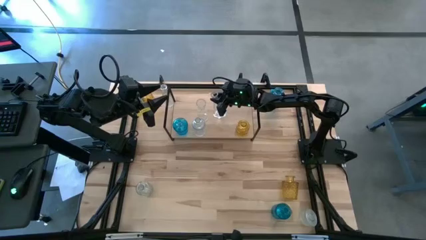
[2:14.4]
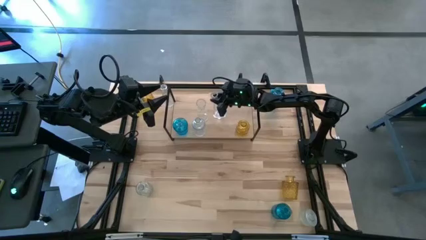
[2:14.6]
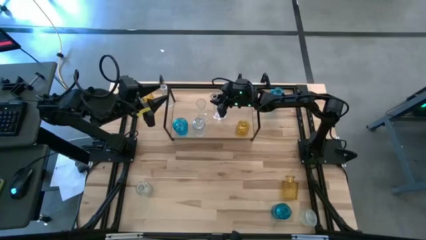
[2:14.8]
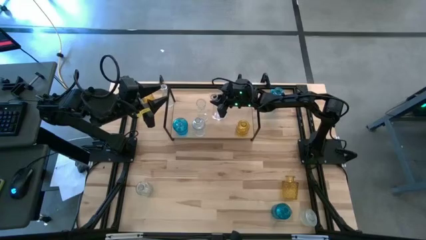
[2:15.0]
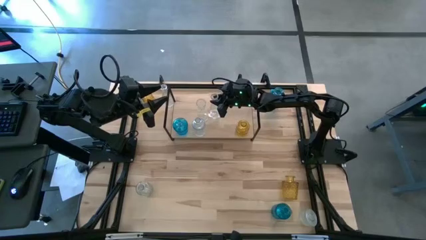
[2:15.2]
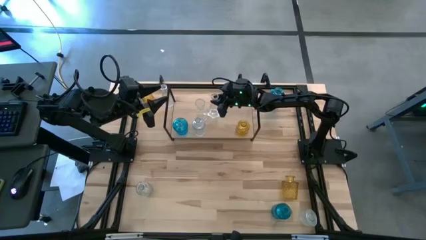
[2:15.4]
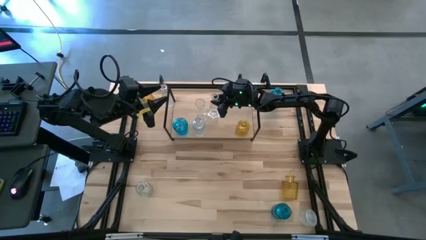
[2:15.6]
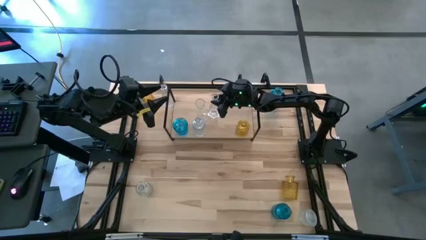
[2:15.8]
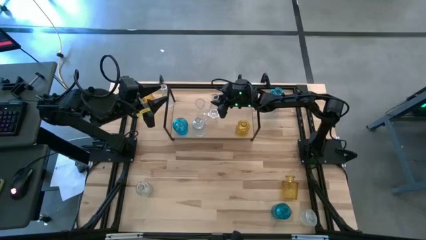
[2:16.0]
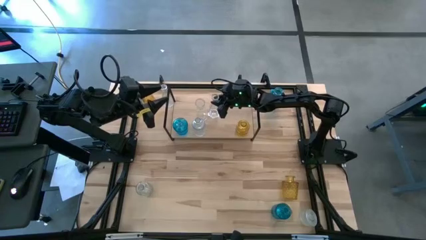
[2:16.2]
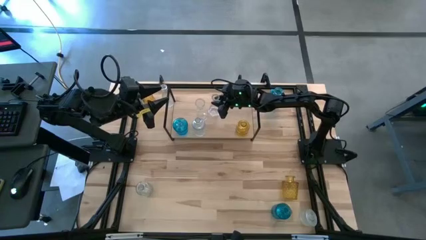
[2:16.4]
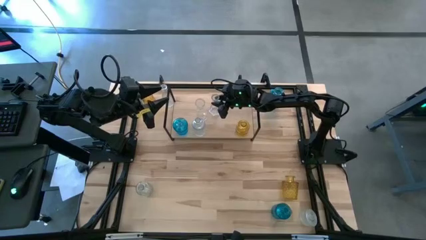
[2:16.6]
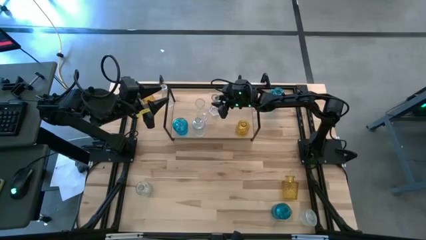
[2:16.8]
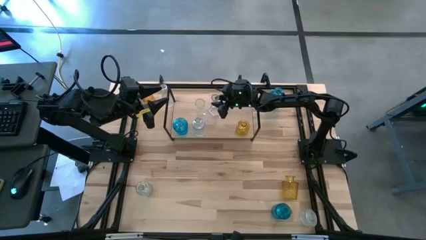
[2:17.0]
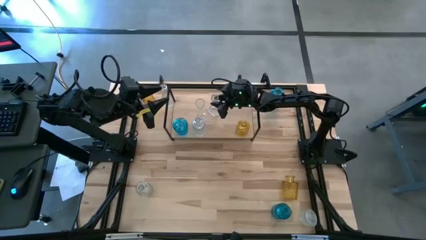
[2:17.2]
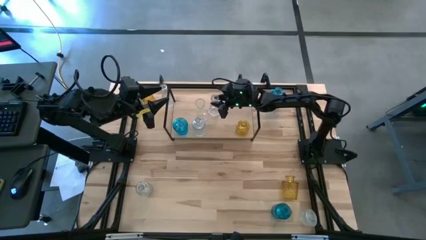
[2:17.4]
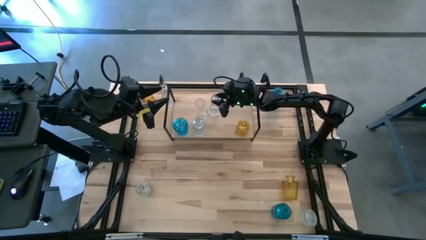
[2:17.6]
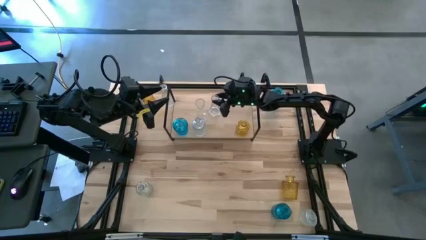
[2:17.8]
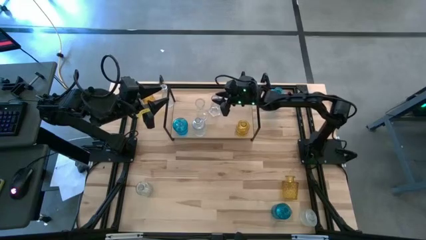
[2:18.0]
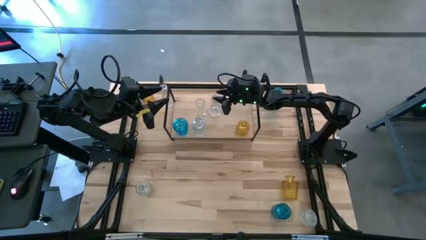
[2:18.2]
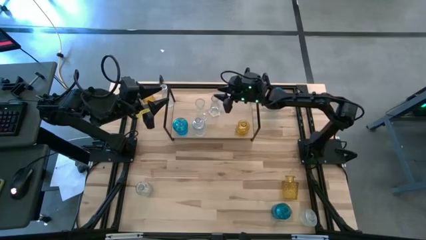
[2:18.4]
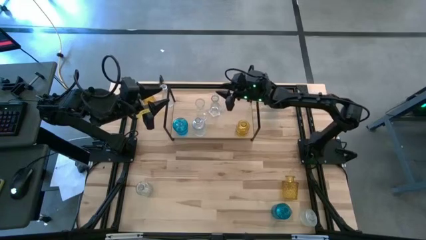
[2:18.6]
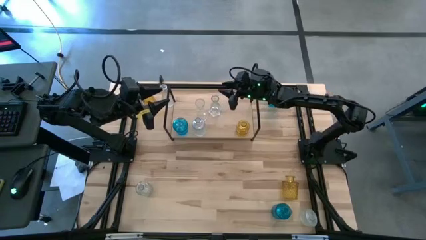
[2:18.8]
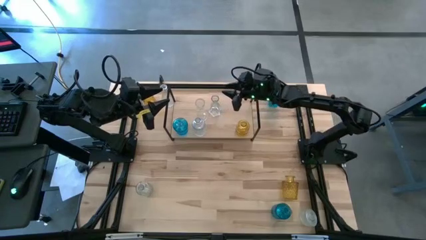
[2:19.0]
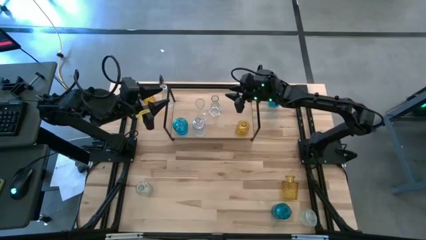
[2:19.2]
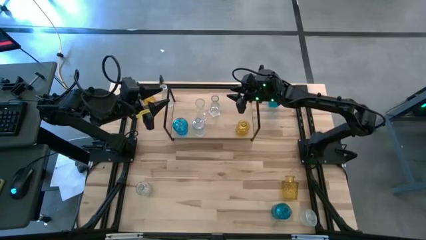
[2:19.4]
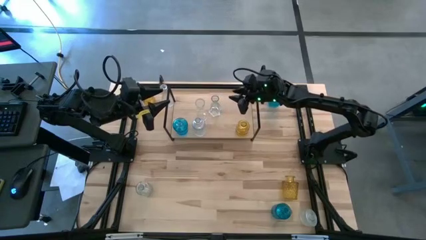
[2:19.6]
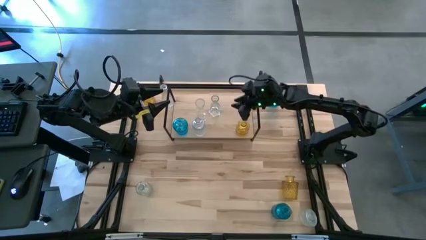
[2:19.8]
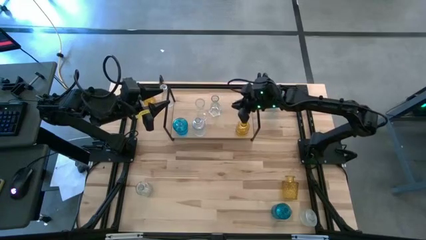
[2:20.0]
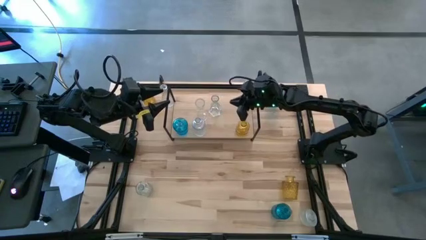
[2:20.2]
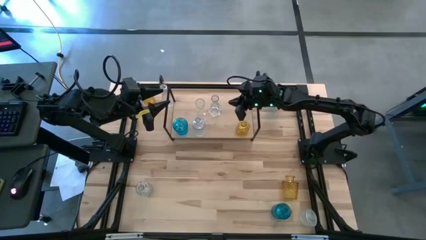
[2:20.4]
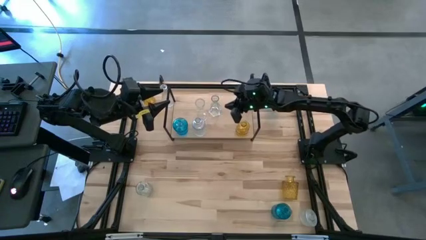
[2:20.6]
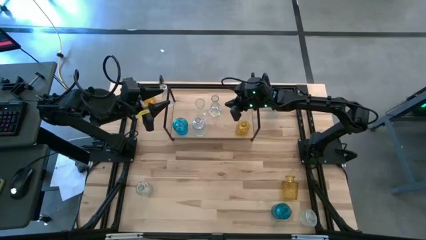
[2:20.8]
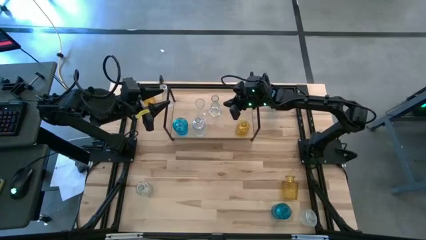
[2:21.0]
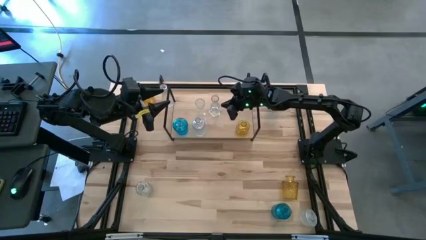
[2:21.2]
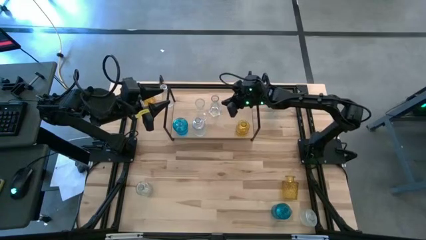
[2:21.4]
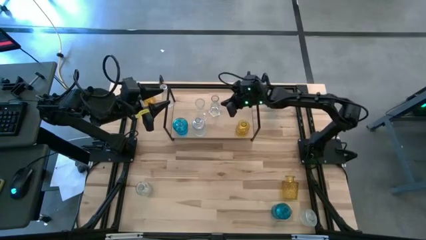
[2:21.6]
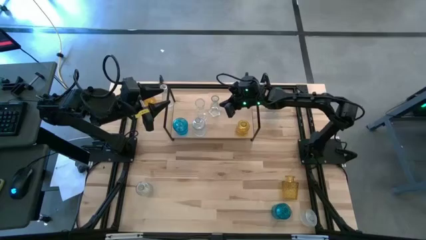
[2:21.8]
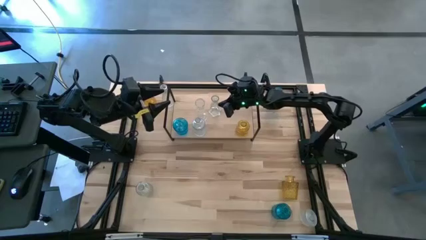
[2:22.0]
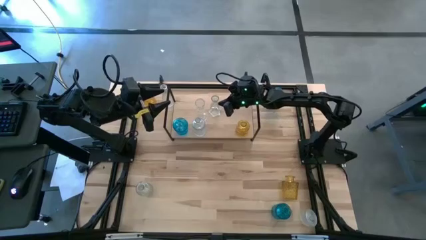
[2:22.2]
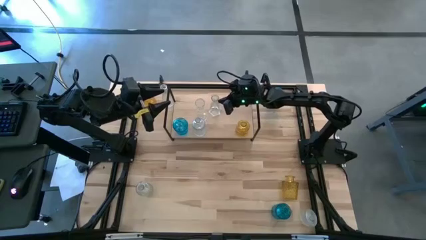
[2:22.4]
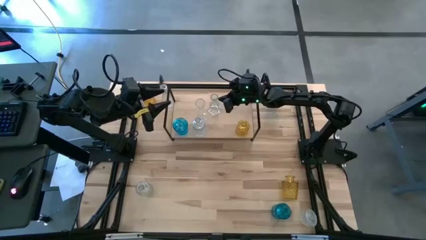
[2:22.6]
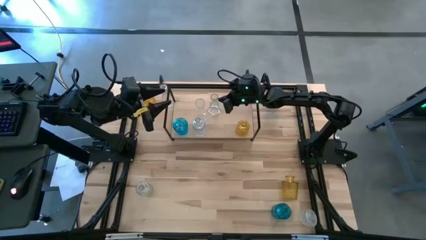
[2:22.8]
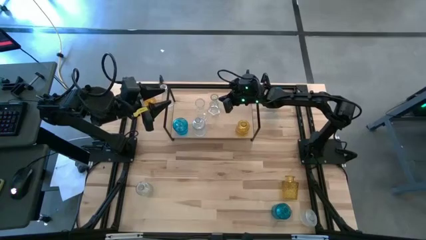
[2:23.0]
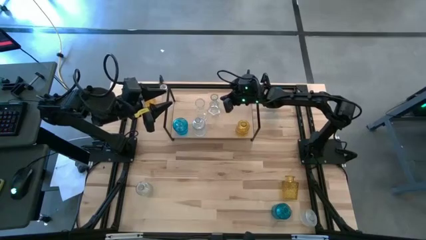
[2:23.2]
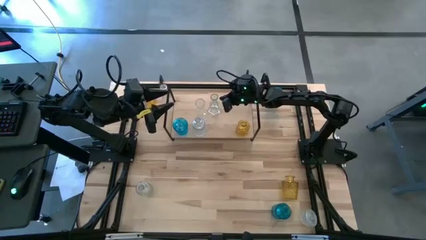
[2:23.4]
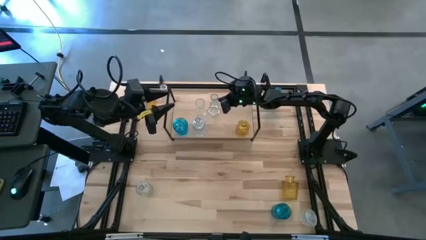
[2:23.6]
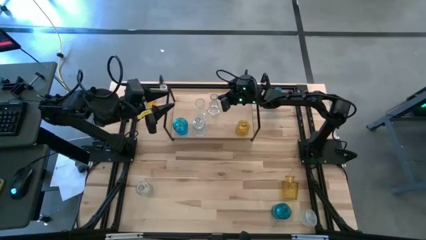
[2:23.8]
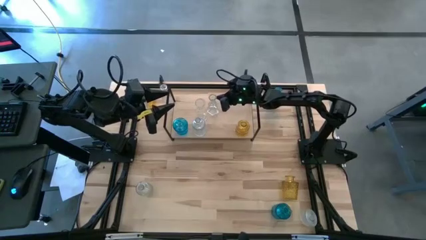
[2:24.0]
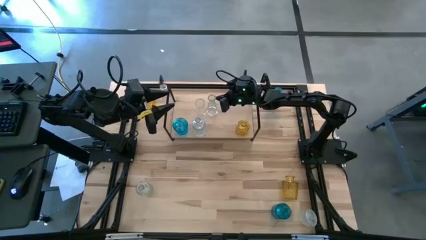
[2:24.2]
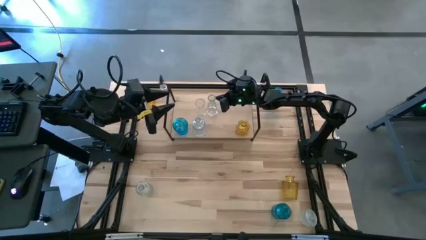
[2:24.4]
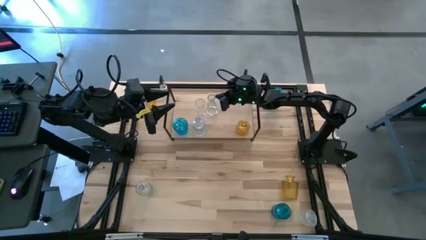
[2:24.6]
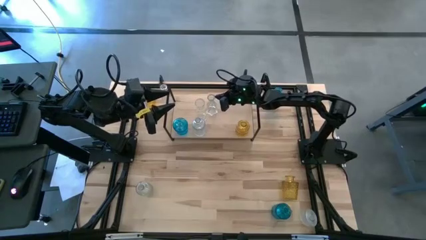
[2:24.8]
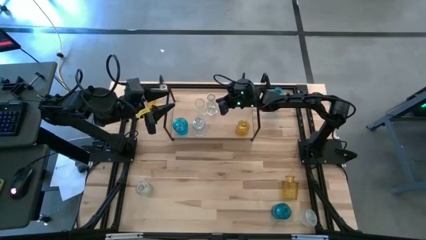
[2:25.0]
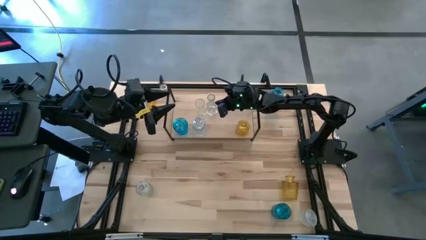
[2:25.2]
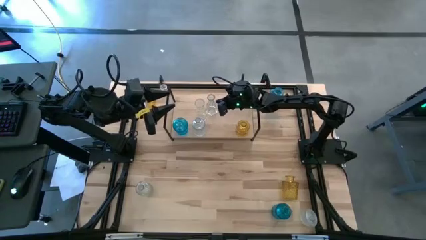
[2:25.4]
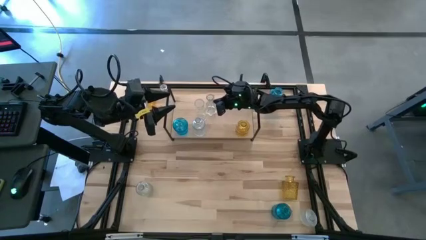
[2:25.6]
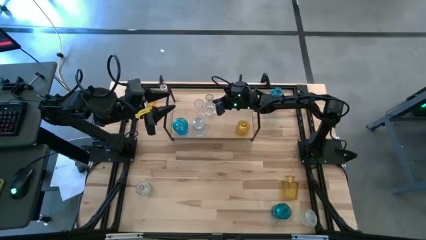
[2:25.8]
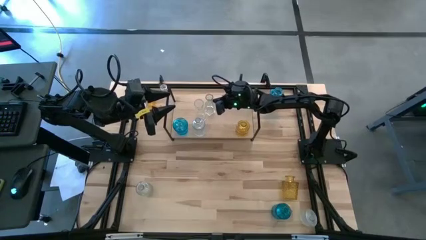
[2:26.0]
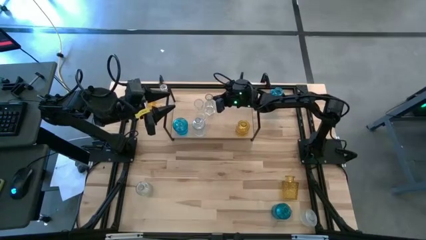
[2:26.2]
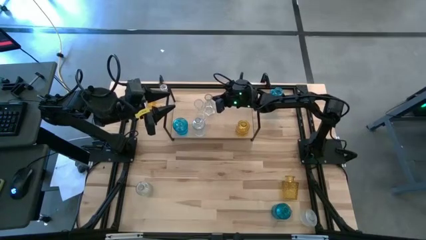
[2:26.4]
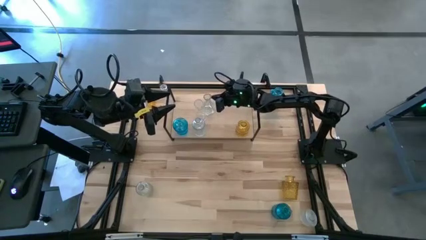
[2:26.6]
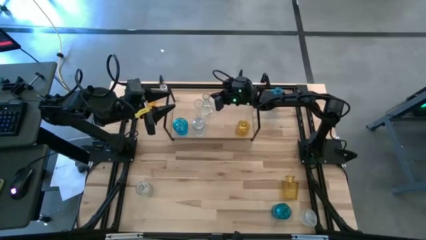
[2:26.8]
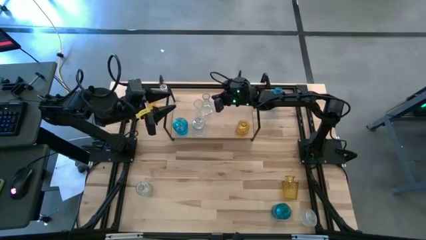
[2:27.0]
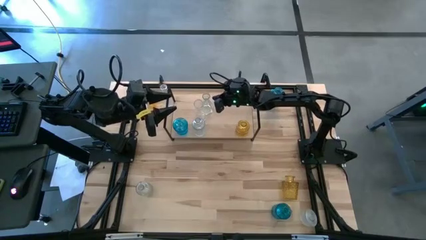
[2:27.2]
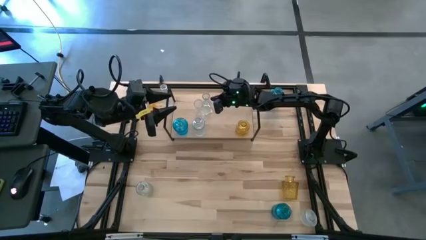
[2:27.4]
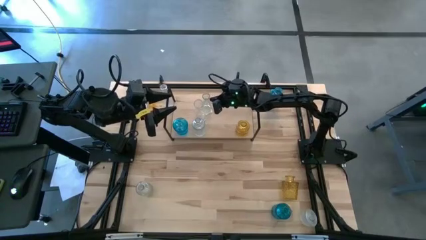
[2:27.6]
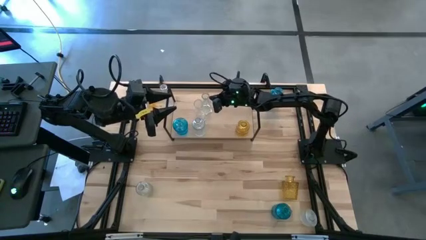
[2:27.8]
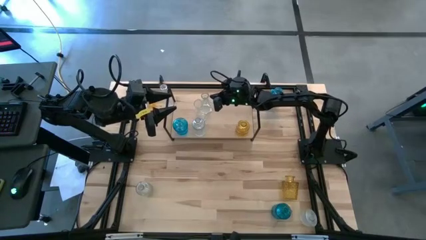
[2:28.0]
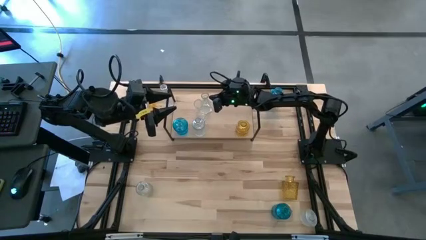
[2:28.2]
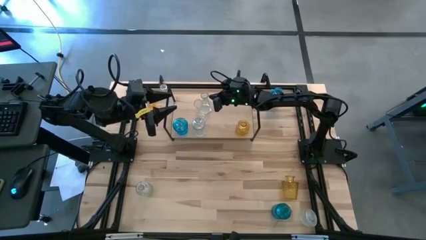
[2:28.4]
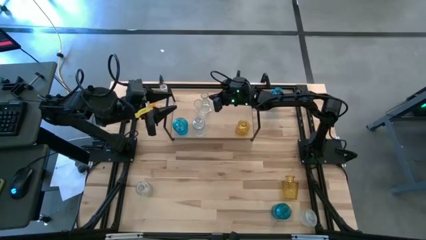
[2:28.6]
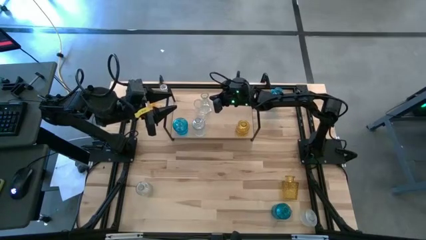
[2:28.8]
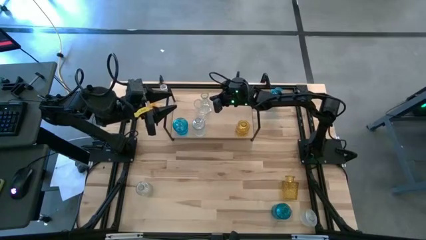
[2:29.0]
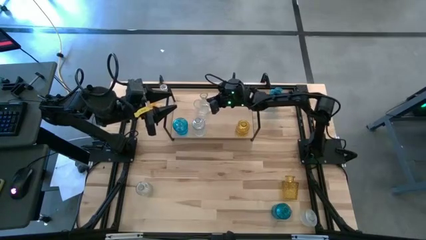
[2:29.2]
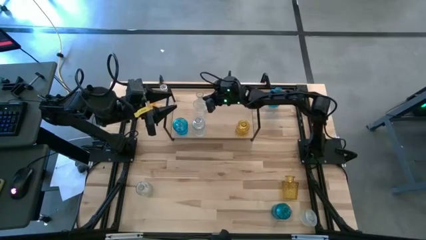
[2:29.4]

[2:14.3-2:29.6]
Task: sort vases onto shelf
Put the transparent vase on the shelf aligned with the other transparent vases
